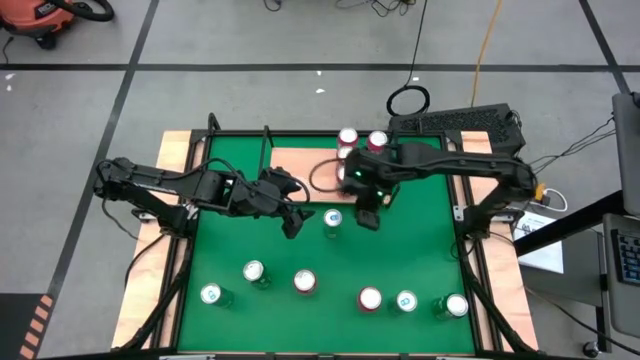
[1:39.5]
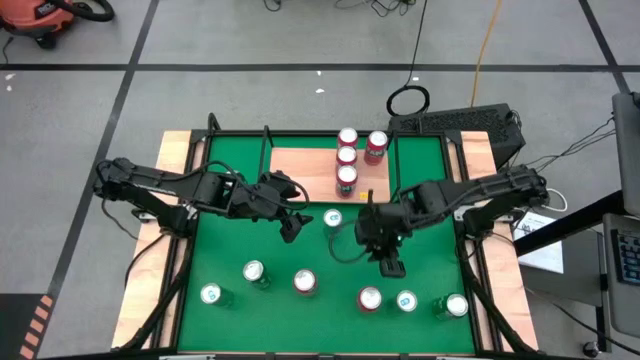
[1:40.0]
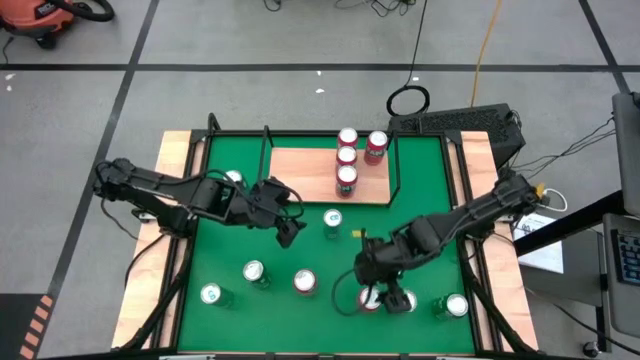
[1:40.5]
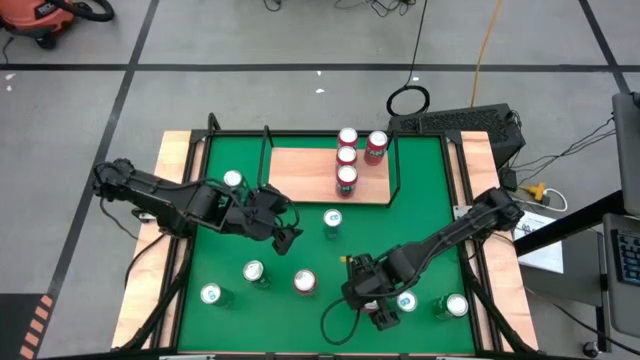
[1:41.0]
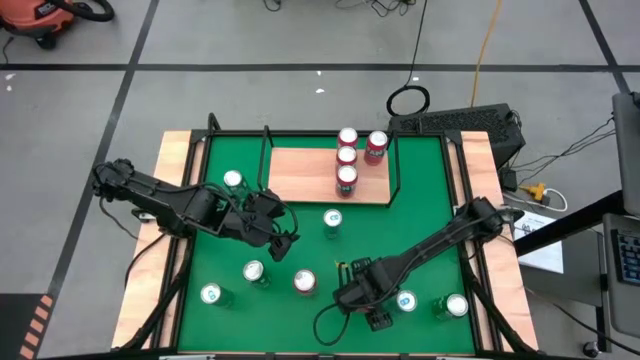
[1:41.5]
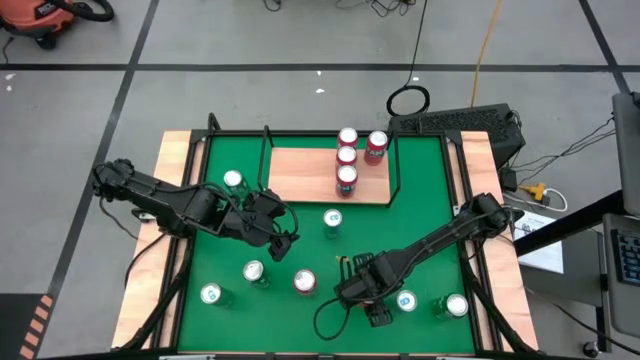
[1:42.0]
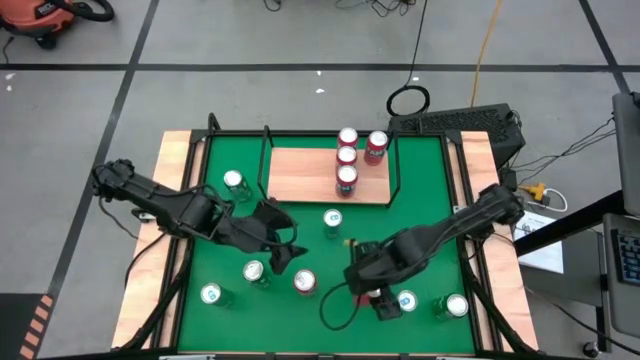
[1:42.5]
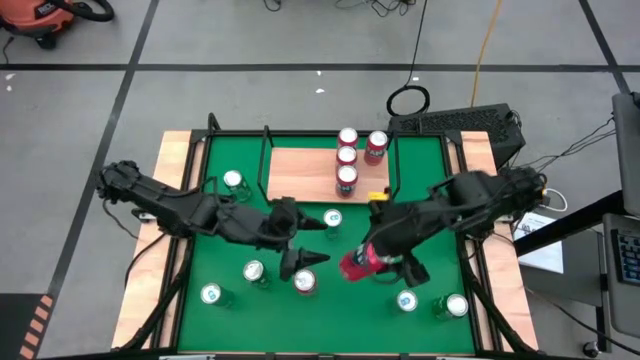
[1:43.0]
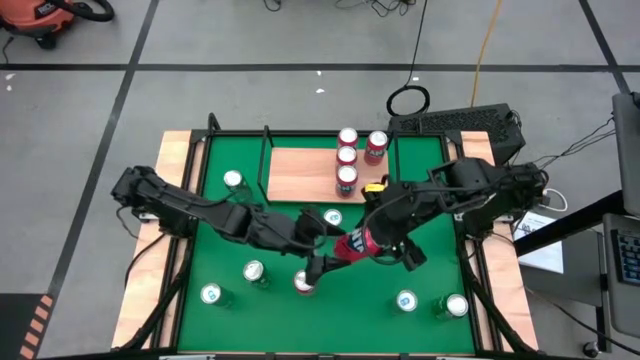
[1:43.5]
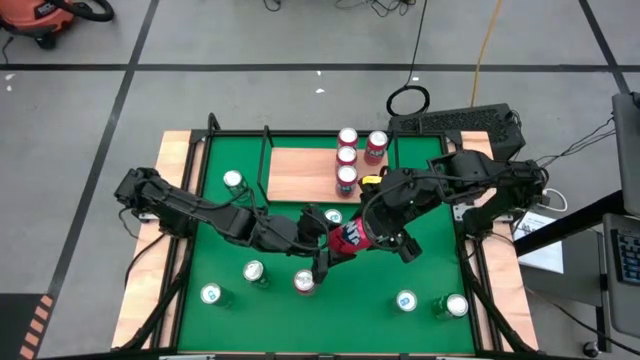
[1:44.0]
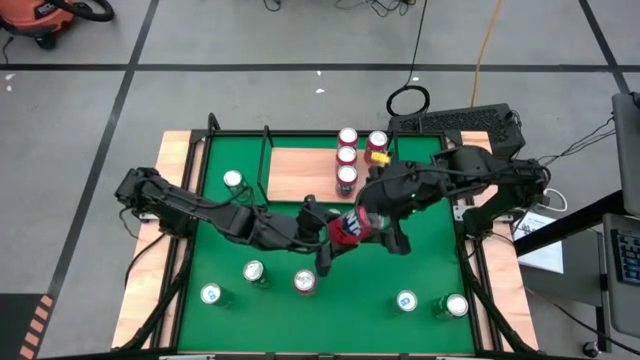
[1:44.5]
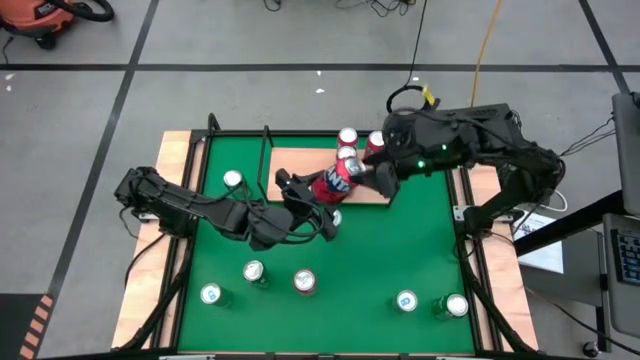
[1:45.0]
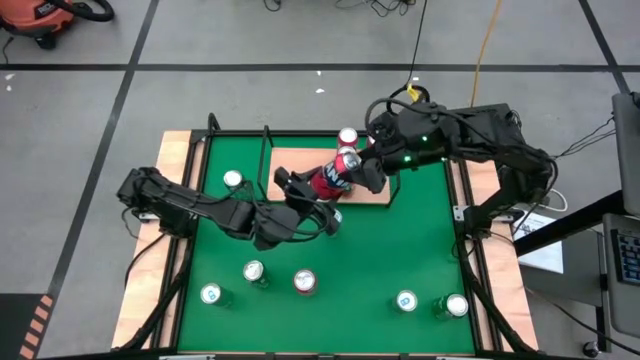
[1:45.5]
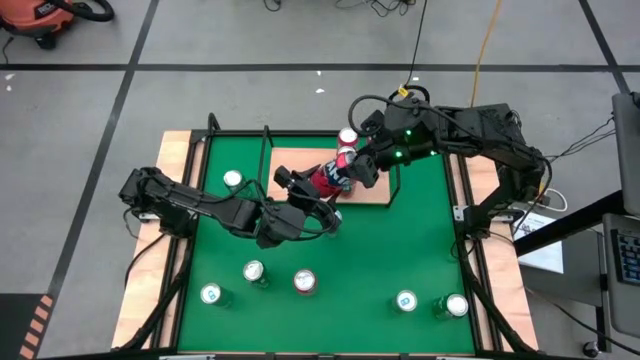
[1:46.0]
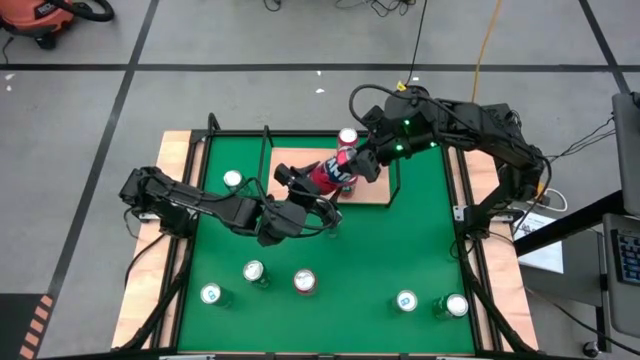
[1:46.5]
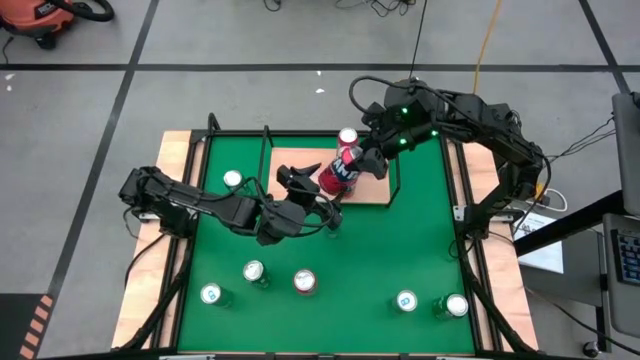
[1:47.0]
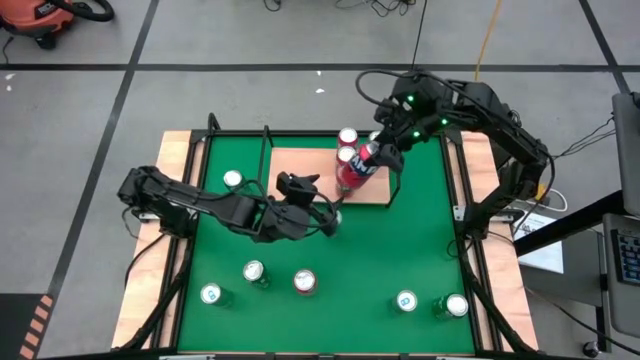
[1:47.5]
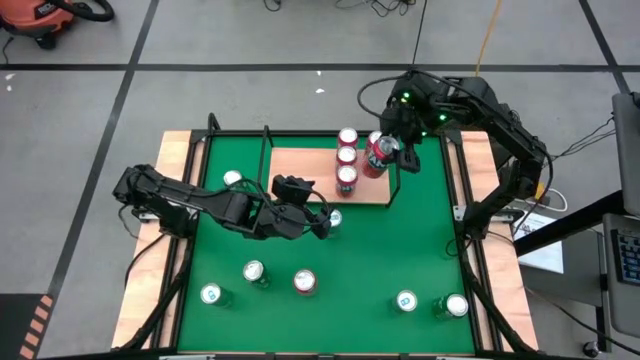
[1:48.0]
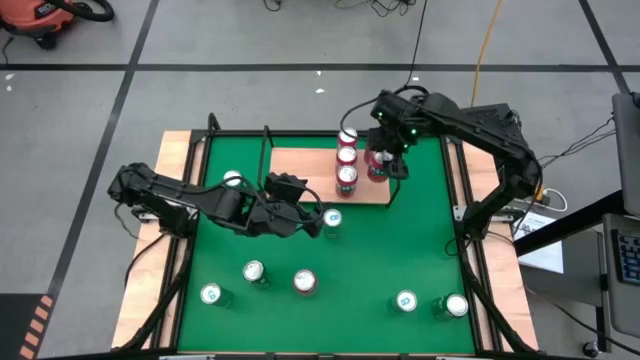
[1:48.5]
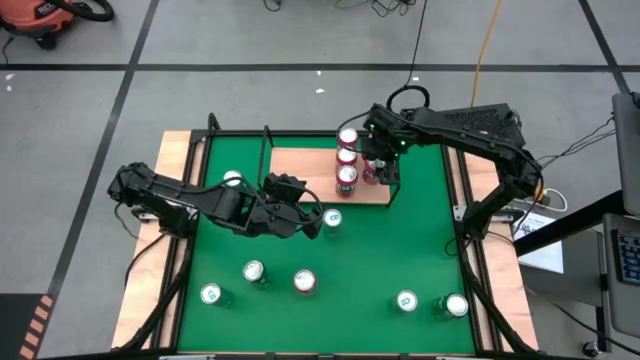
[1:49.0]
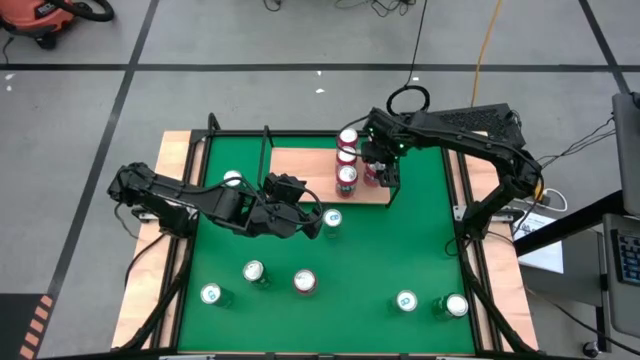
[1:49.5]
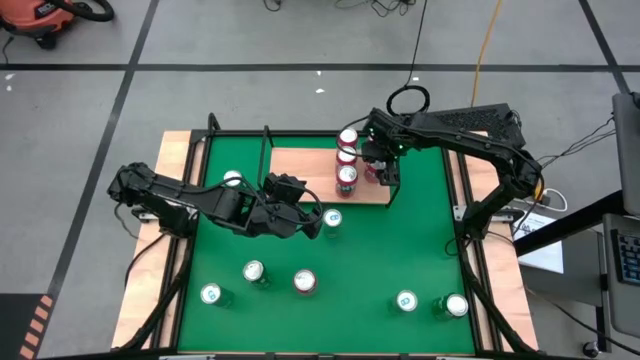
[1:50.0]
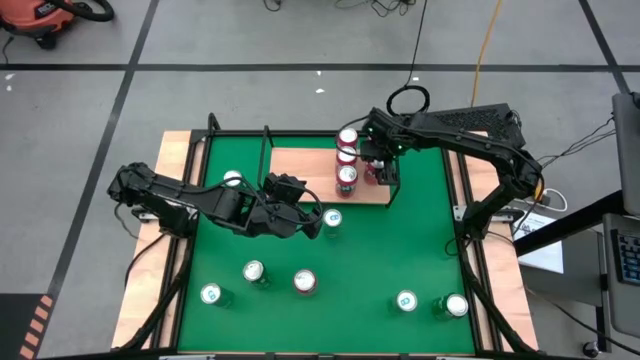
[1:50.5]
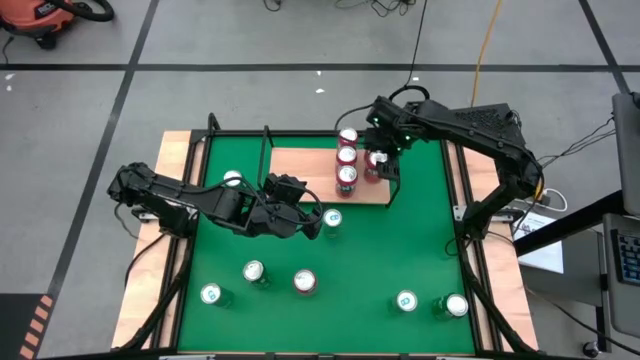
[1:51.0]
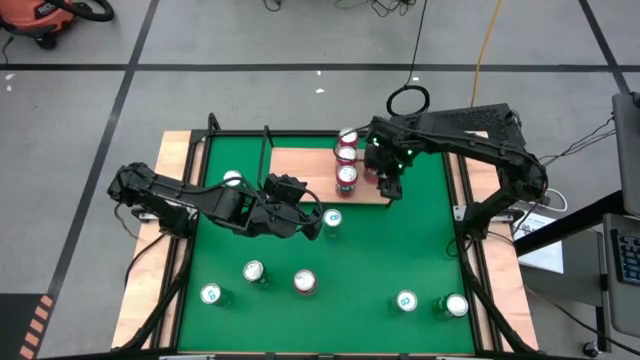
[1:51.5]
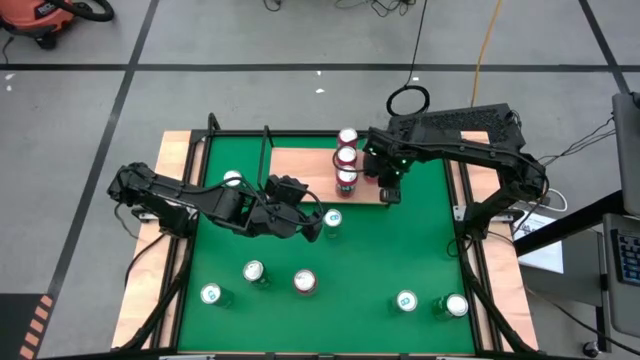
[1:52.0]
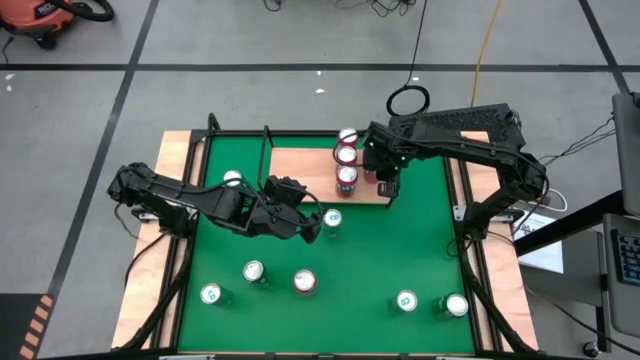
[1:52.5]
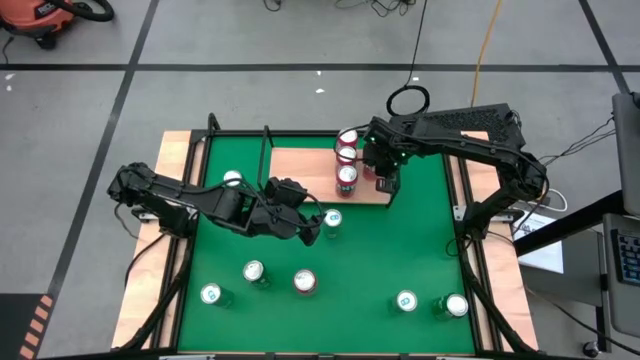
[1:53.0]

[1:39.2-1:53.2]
Task: Place canned beverage on shelf
Put the red soda can on the shelf aligned with the other red soda can on the shelf

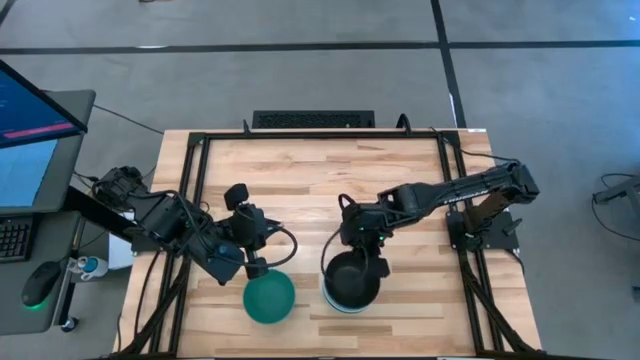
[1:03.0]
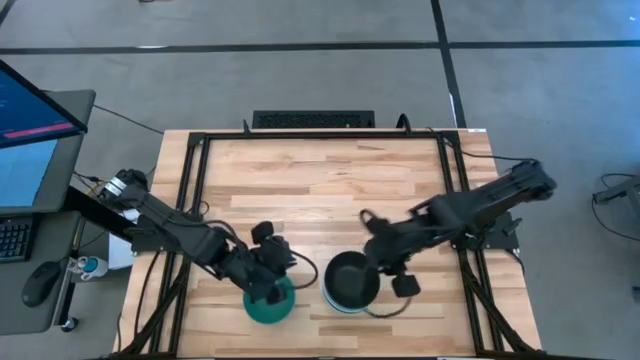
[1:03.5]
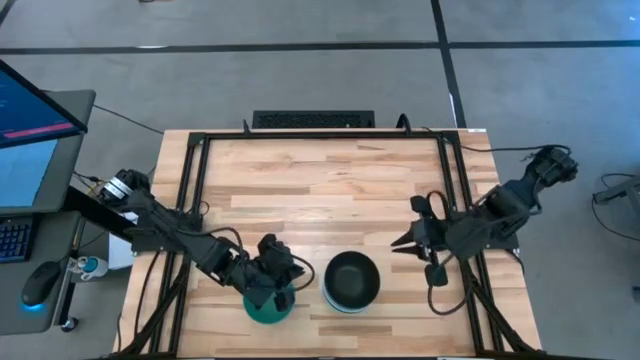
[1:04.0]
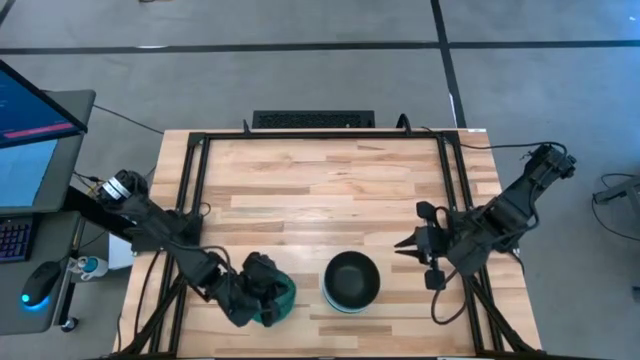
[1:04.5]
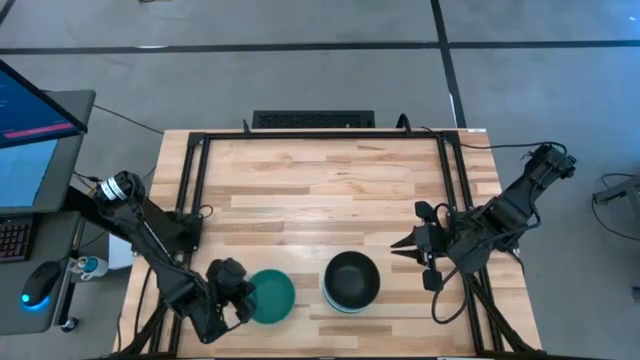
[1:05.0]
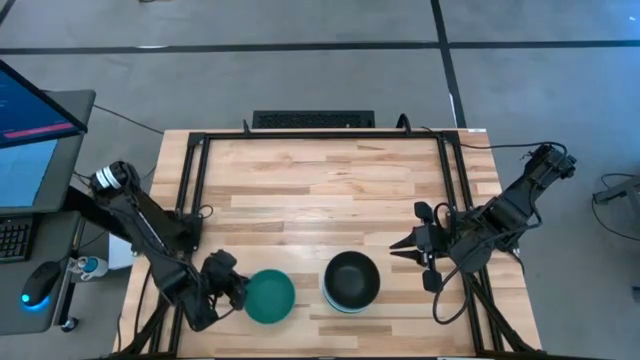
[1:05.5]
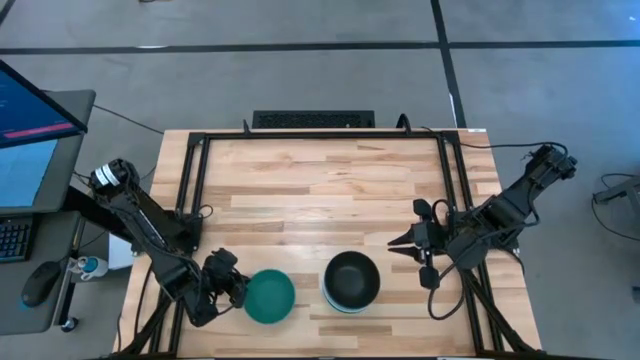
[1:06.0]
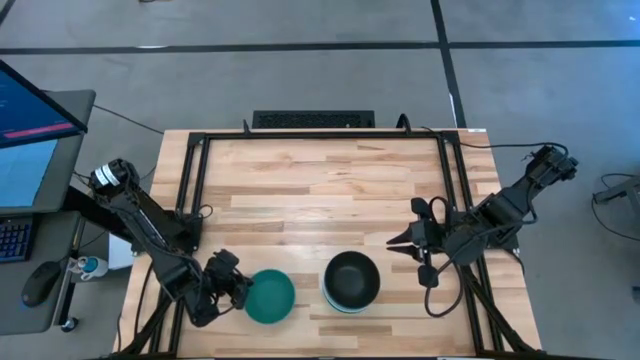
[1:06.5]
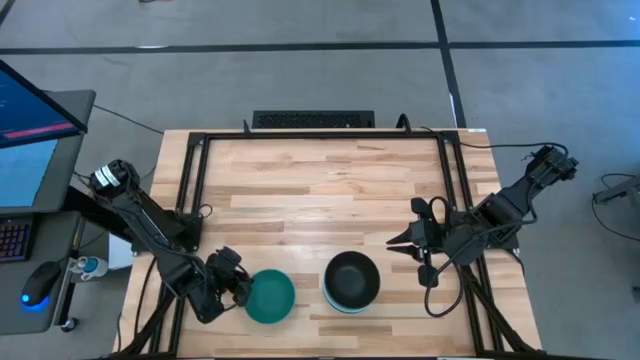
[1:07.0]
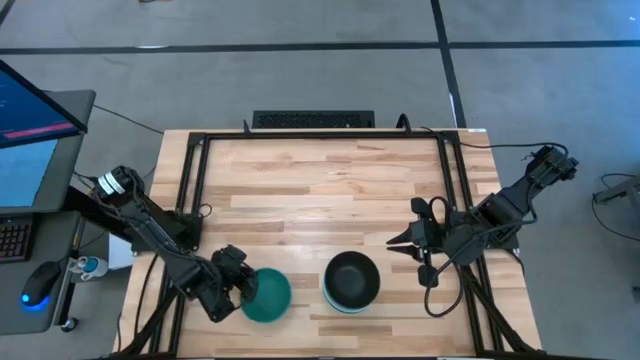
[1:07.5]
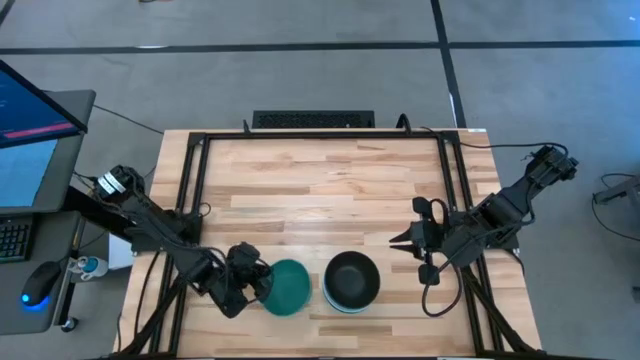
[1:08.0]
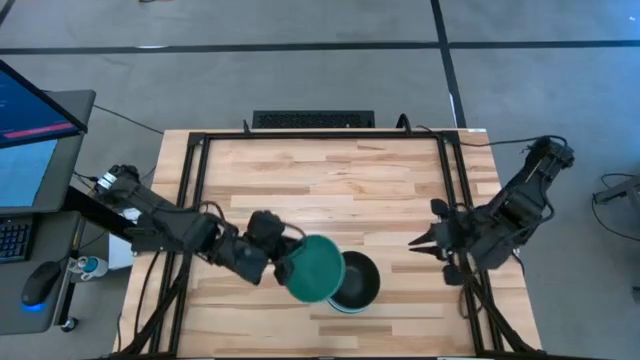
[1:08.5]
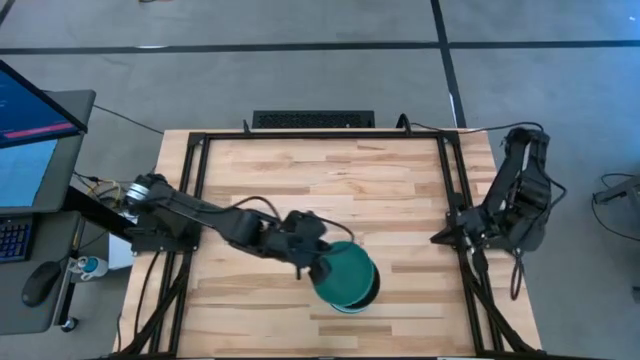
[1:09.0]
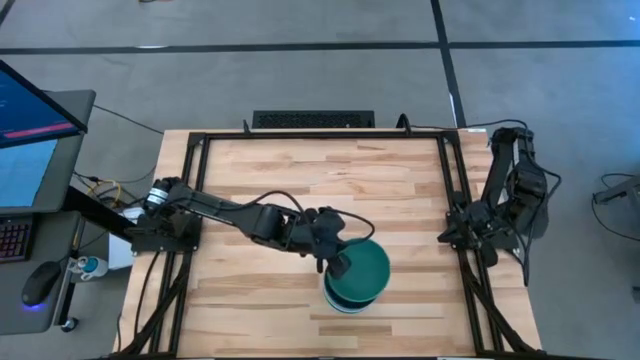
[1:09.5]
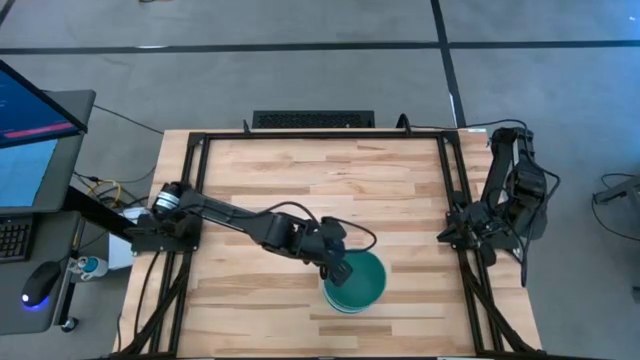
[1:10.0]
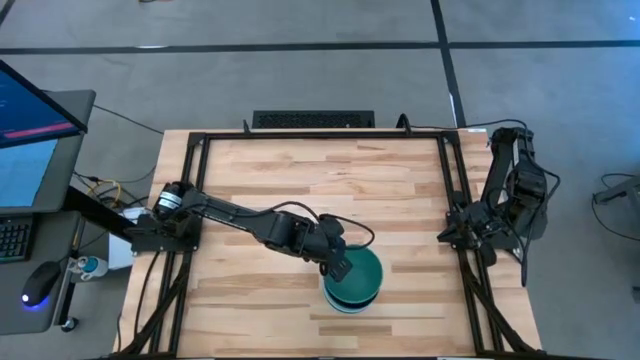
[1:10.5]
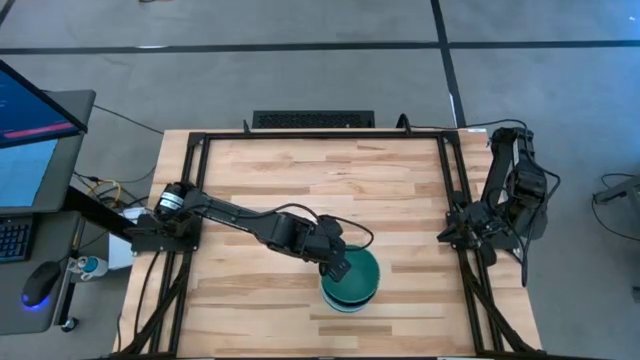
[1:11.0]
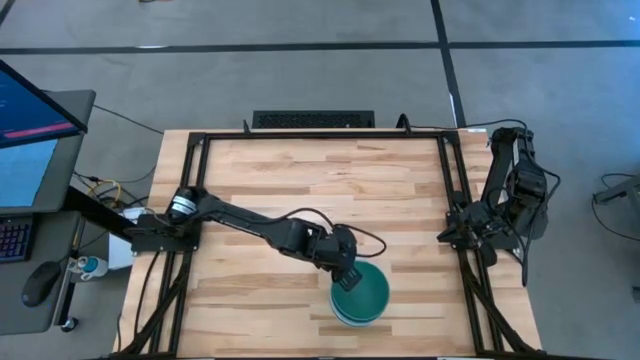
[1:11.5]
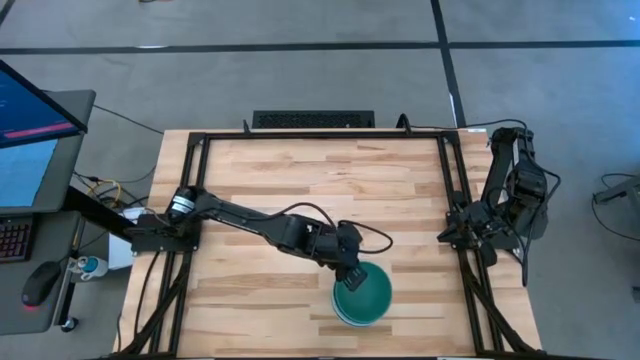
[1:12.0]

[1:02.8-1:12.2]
Task: Nest bowls inside each other
Stack the green bowl on the black bowl
